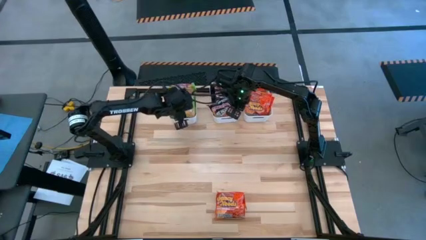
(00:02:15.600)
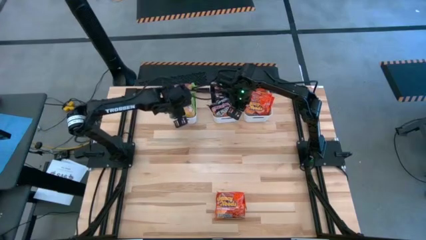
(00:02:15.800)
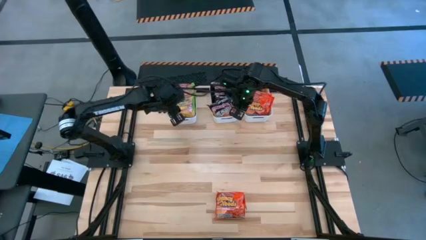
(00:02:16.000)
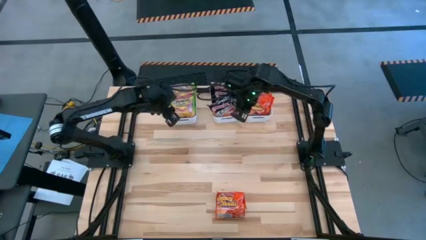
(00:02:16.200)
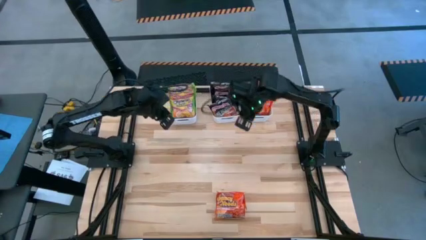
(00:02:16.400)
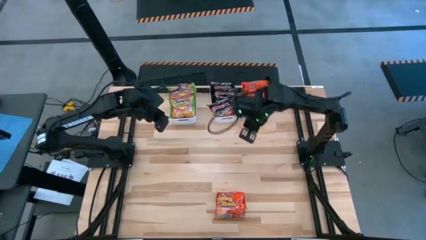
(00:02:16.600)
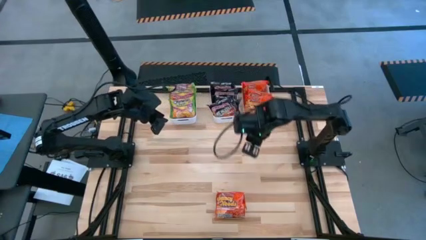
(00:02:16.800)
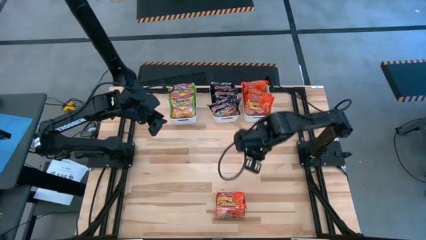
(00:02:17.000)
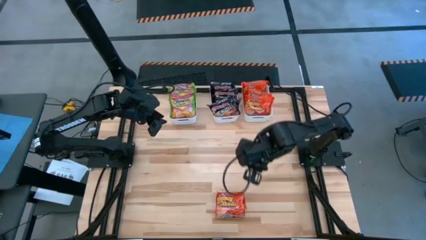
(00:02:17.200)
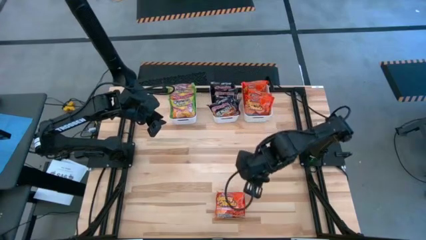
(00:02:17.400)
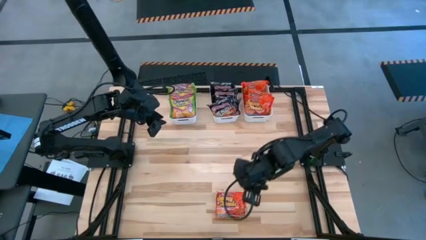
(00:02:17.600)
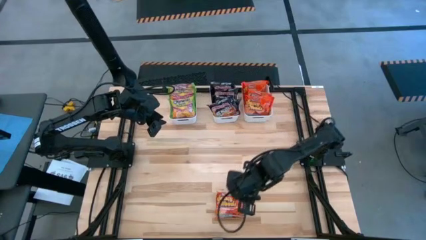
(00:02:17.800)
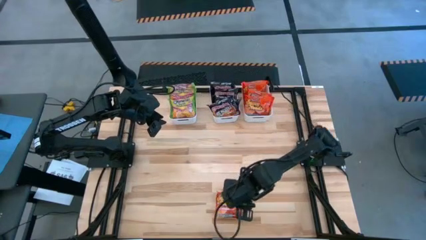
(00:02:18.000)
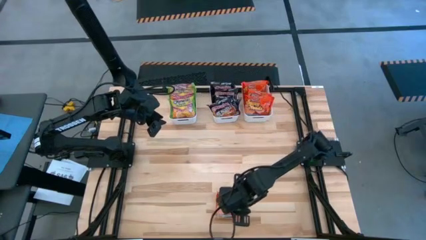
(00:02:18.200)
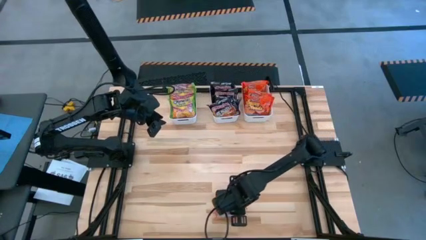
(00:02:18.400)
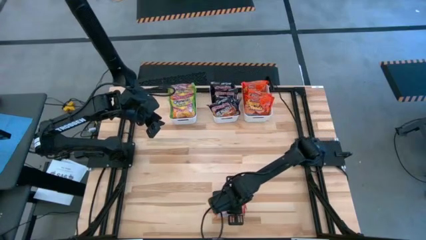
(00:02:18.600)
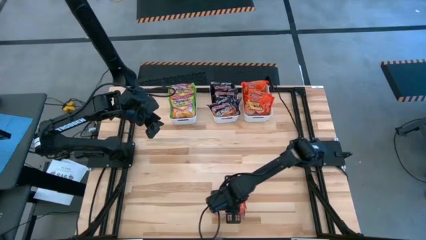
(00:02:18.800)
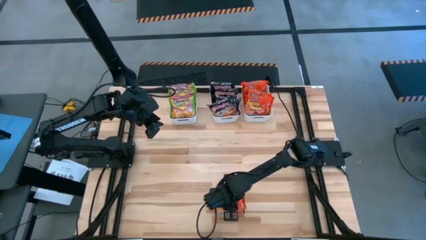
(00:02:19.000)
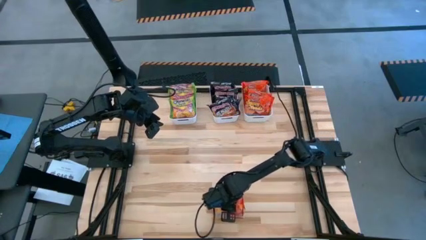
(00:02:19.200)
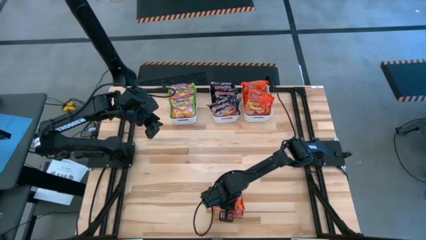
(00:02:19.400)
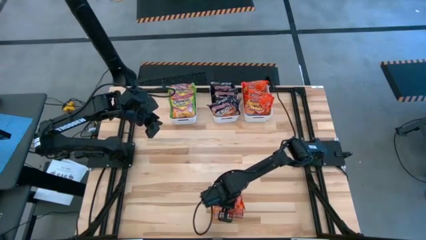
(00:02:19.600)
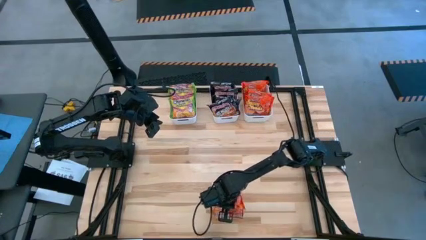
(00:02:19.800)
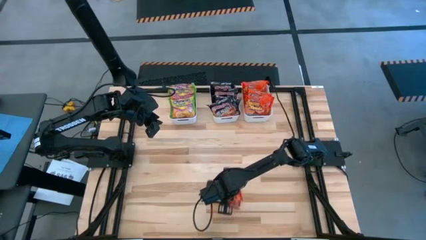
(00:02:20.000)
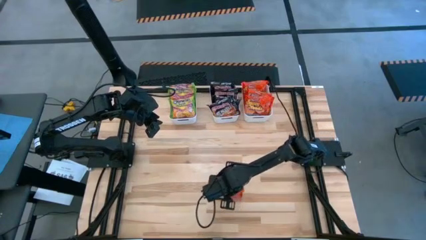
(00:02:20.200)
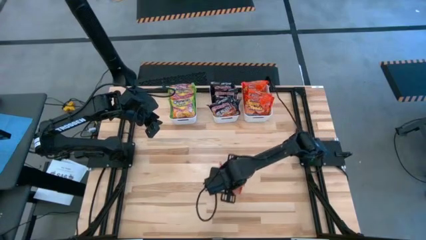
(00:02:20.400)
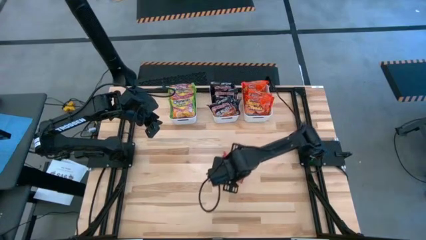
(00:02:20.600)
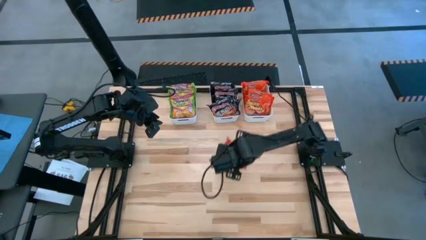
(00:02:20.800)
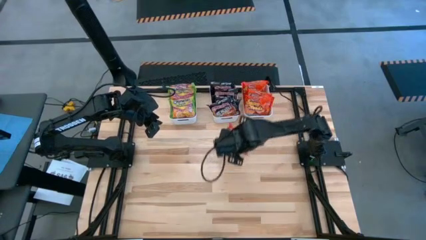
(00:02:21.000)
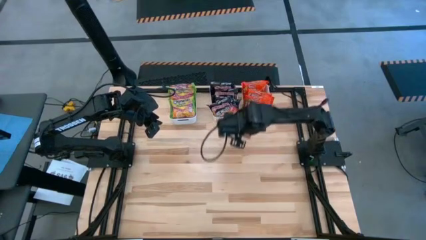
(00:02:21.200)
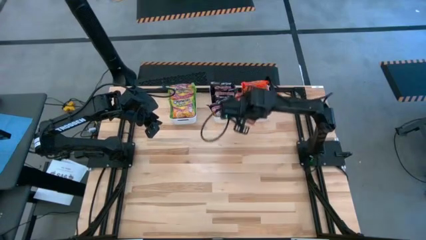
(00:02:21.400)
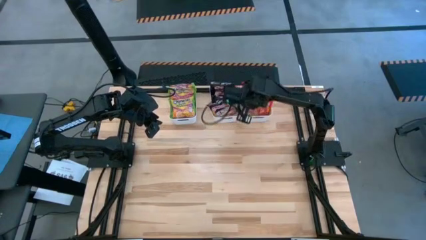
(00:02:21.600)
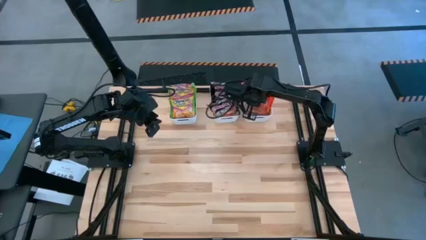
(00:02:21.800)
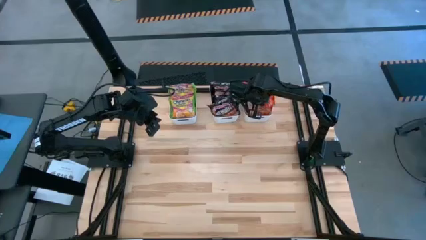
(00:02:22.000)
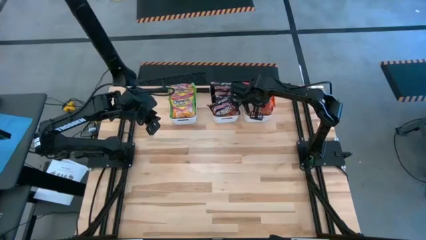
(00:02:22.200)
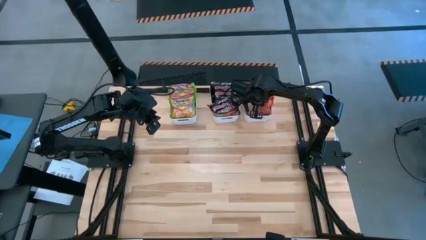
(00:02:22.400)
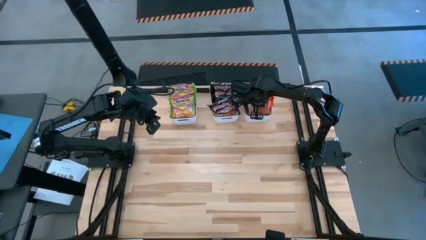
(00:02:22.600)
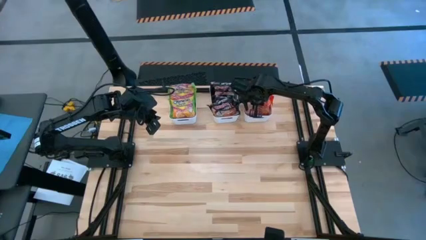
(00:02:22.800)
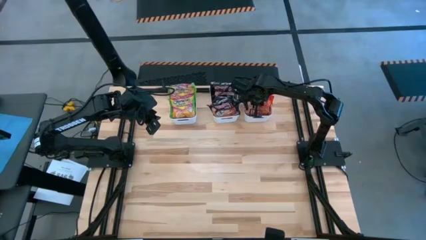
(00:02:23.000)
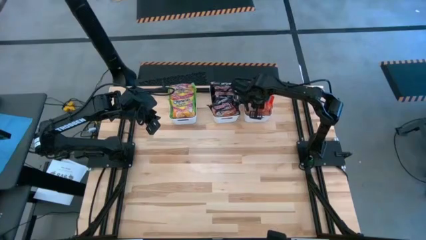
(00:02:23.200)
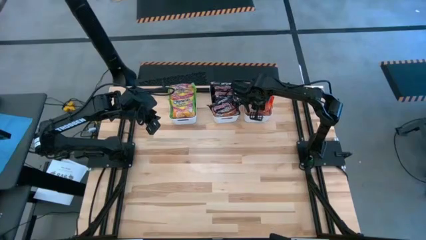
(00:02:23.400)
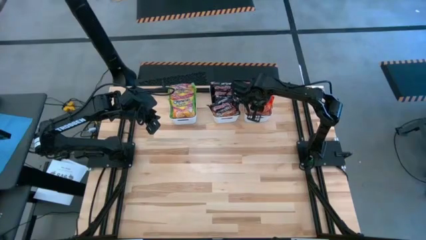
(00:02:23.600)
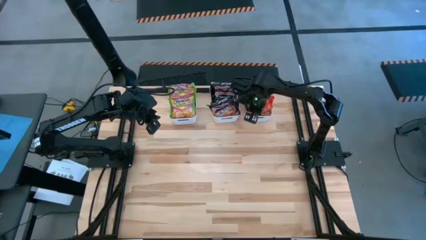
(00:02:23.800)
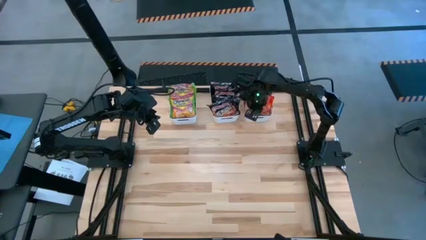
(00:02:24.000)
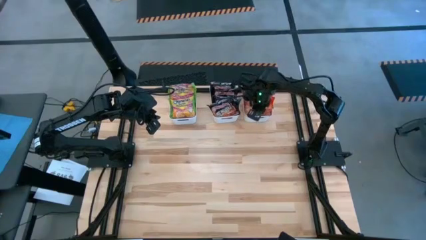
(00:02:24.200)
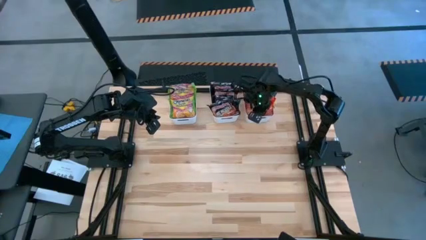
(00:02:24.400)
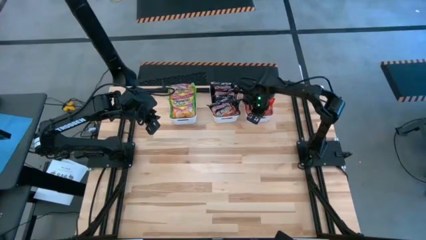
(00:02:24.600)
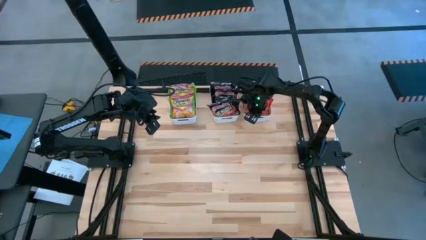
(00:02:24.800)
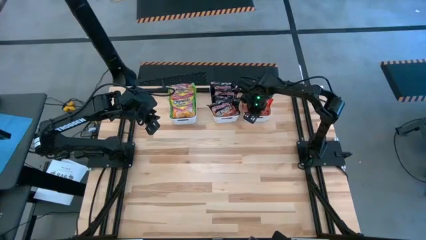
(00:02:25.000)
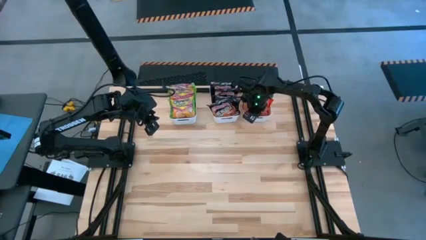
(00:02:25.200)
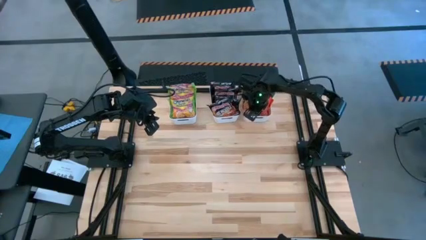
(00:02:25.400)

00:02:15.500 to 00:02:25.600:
Task: Sort Maruchan noodles
Put the orange noodle pack into the right white bin

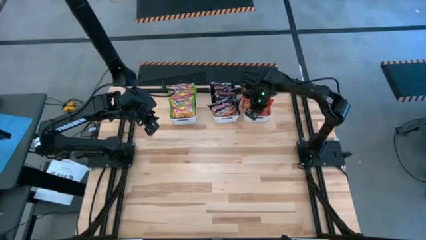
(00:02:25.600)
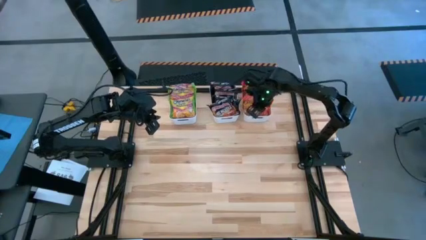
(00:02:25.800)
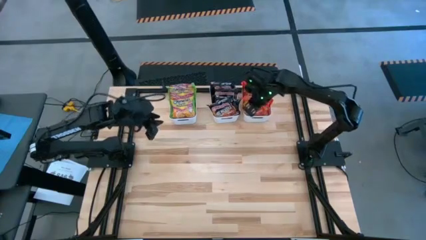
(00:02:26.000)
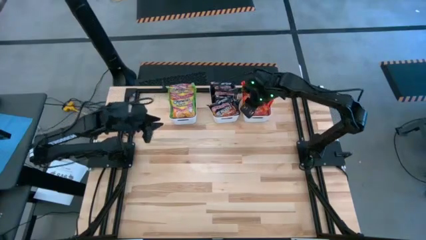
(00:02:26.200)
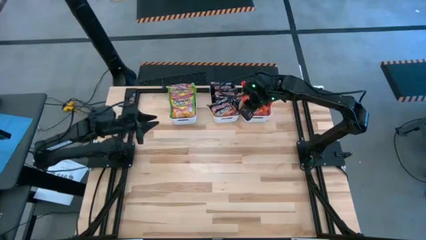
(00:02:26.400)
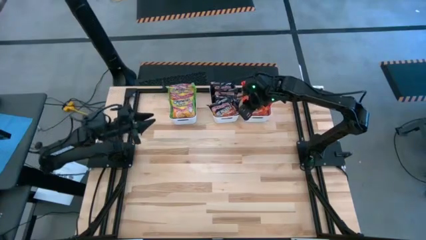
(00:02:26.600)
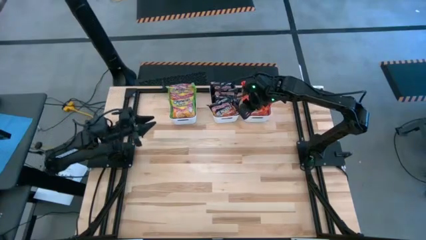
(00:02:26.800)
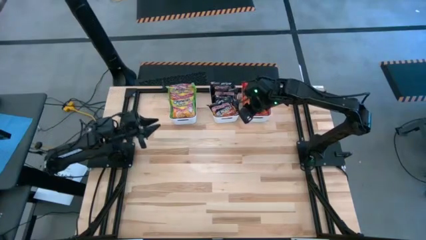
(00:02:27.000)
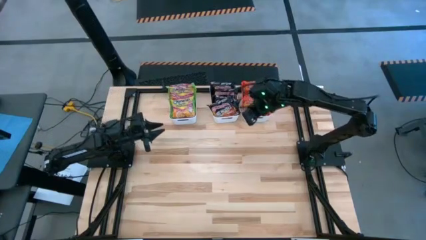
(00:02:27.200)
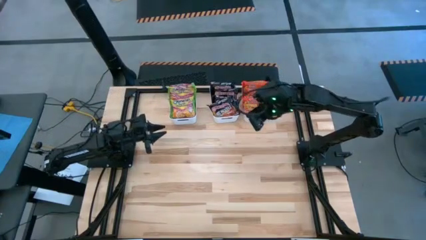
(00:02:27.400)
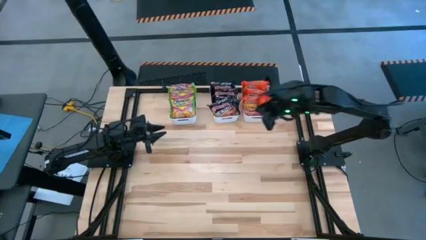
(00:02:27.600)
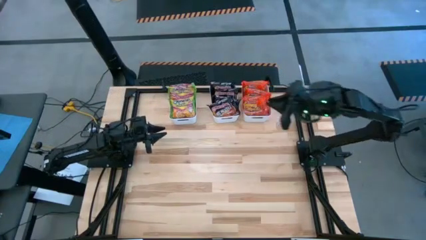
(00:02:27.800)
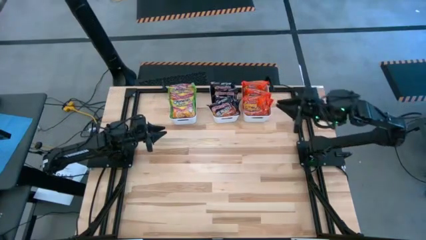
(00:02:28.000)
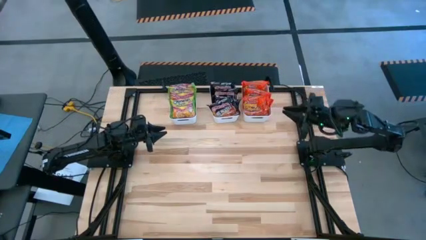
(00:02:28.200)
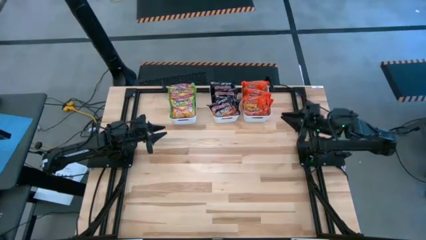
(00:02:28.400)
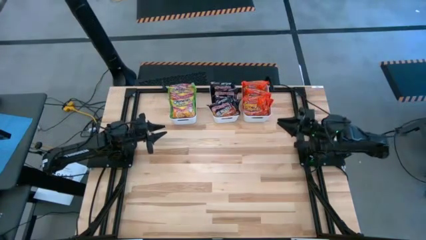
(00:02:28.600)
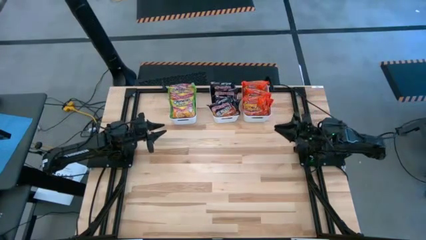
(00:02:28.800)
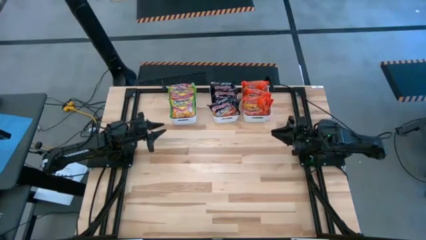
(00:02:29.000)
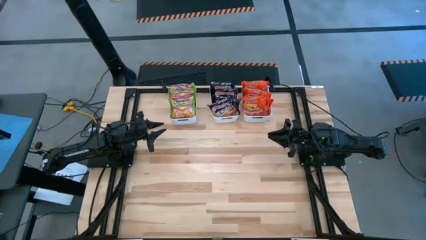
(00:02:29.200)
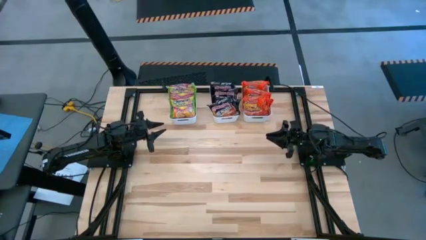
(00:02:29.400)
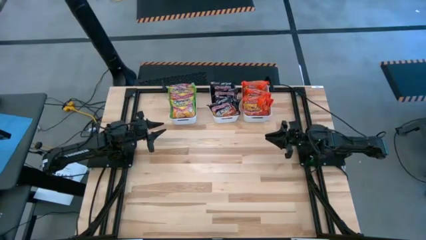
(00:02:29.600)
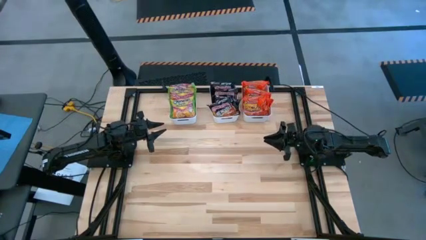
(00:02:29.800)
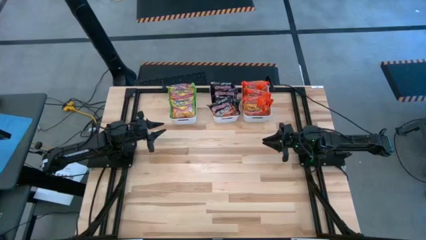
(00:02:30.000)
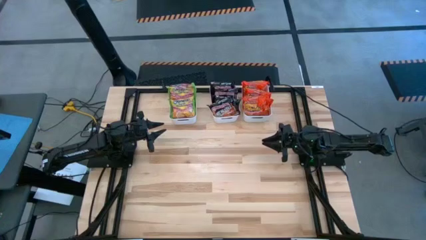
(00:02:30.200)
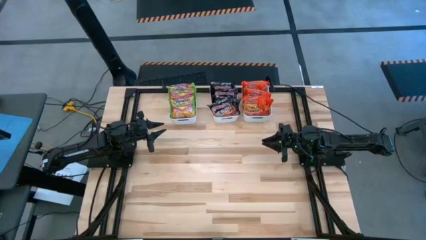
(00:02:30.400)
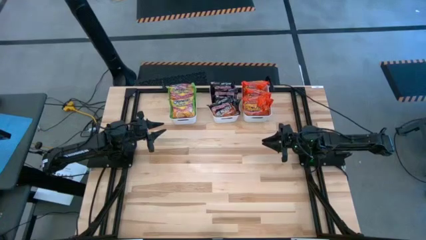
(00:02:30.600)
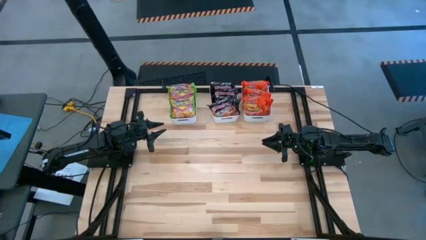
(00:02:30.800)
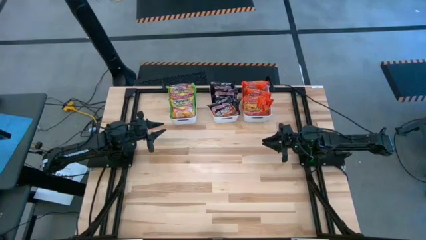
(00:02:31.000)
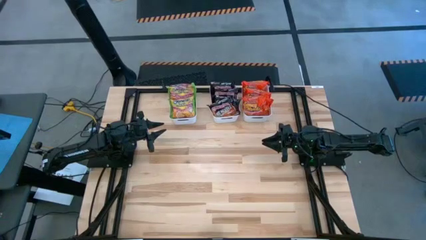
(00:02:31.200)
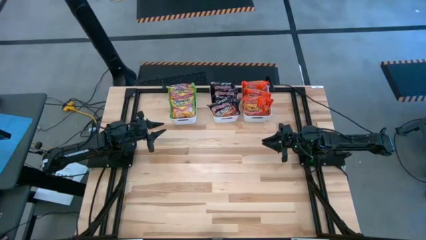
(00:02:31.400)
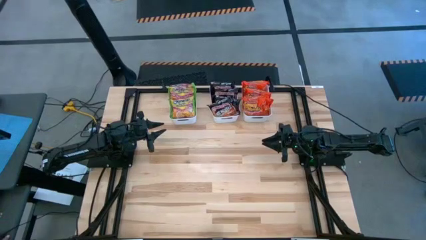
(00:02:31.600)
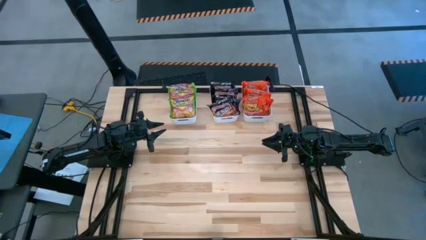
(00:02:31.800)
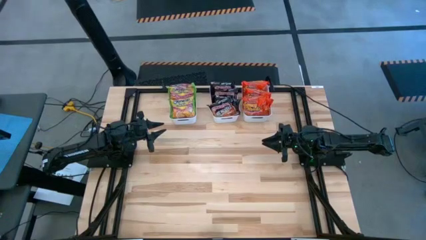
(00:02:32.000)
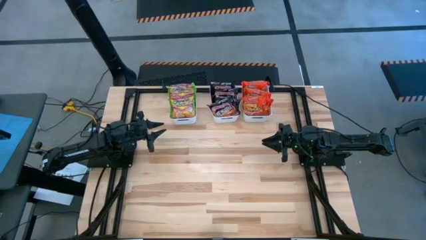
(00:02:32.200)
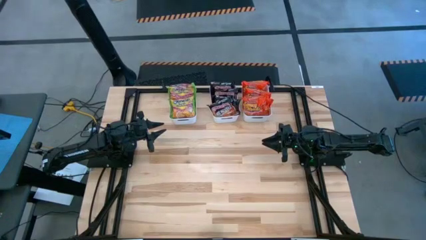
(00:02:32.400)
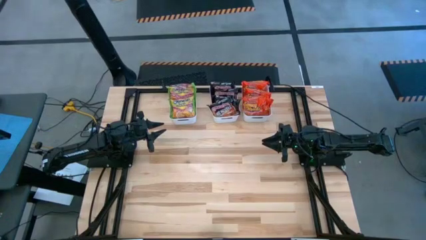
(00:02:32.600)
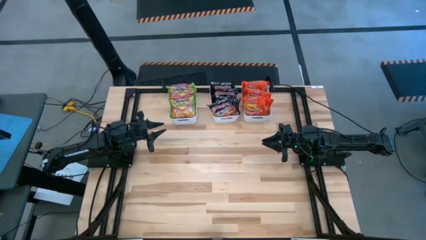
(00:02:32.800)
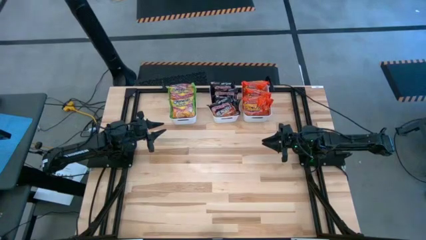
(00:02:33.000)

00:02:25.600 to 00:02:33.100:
Return to Home Position
